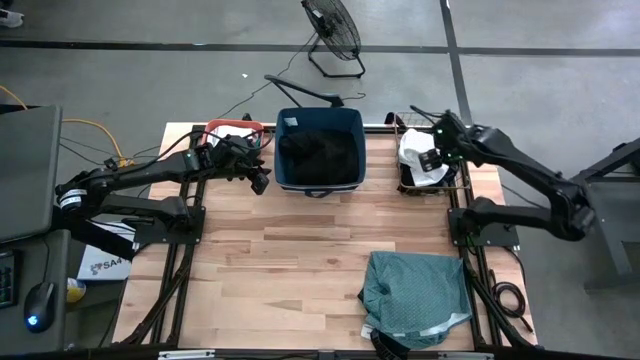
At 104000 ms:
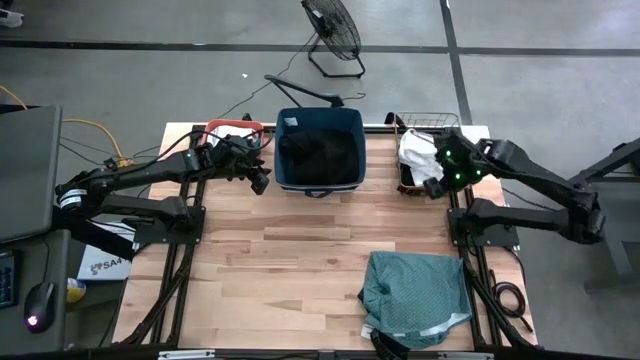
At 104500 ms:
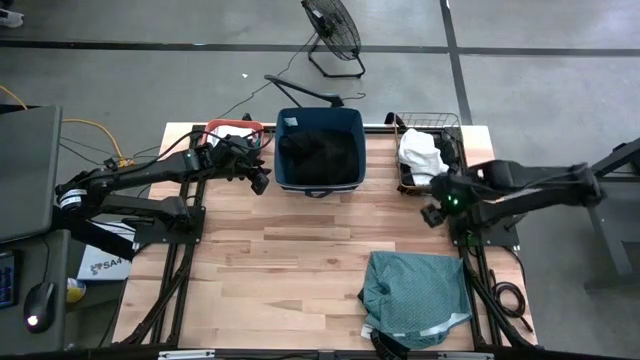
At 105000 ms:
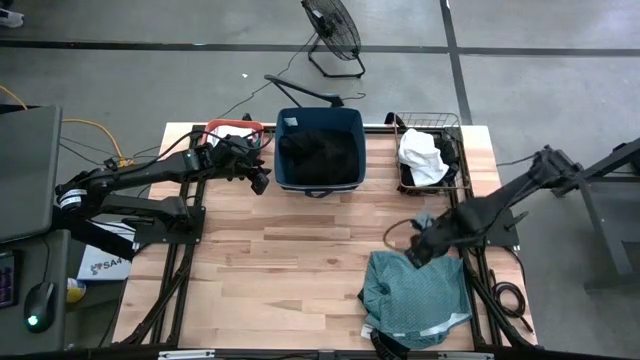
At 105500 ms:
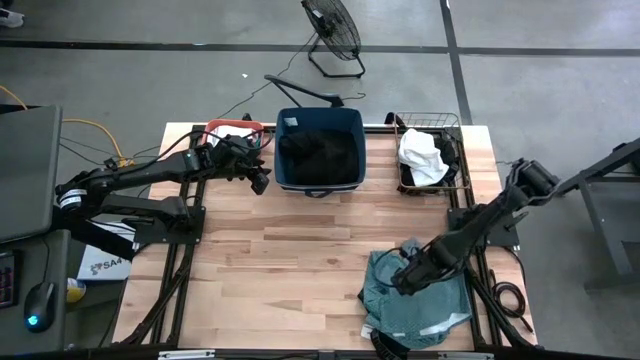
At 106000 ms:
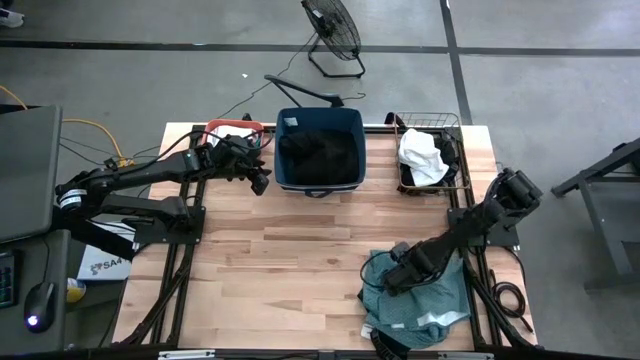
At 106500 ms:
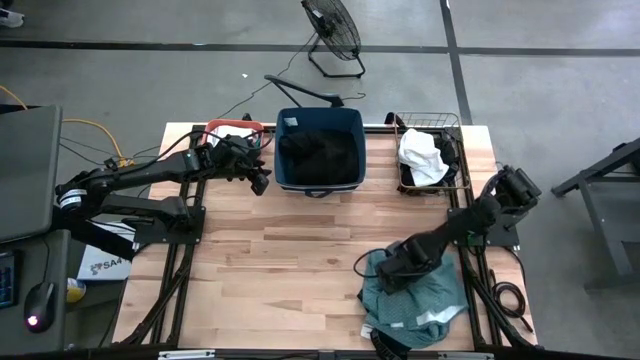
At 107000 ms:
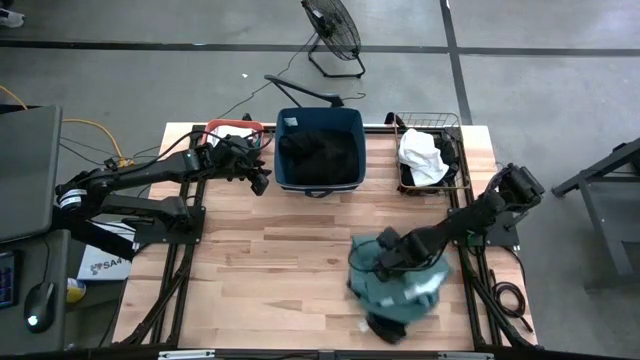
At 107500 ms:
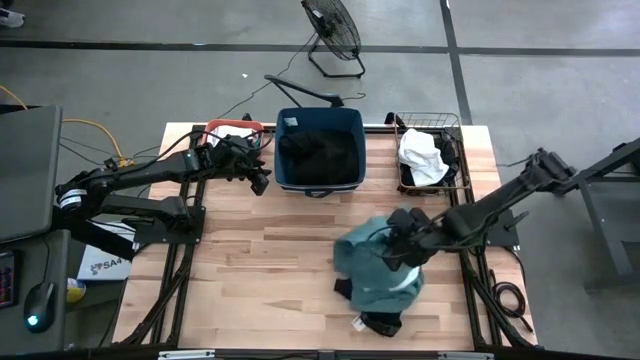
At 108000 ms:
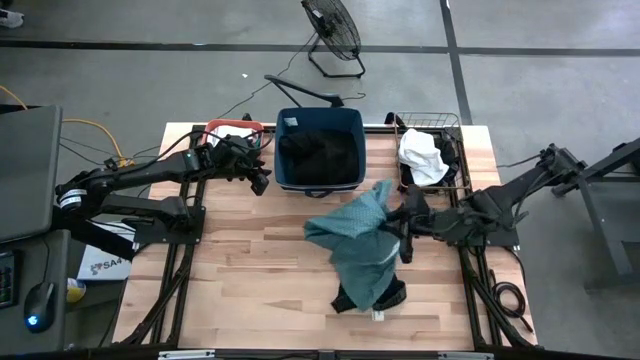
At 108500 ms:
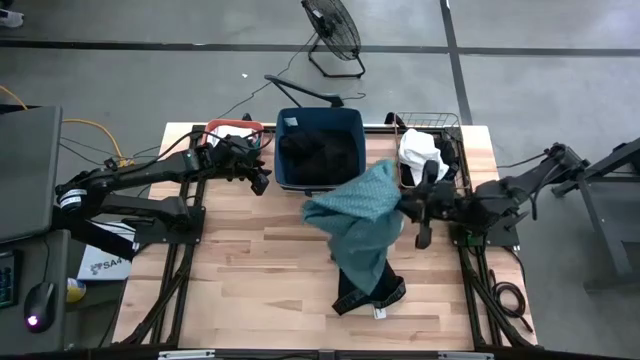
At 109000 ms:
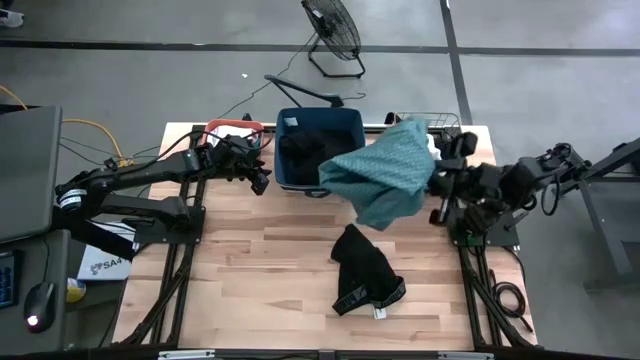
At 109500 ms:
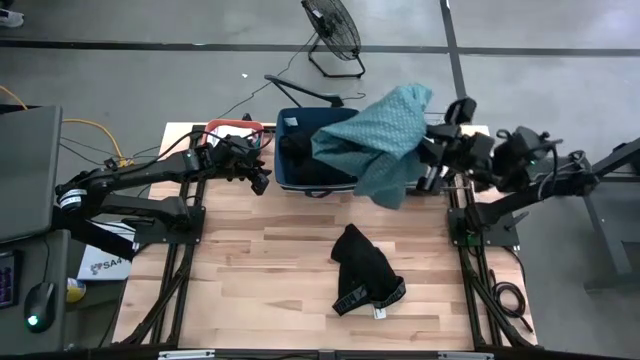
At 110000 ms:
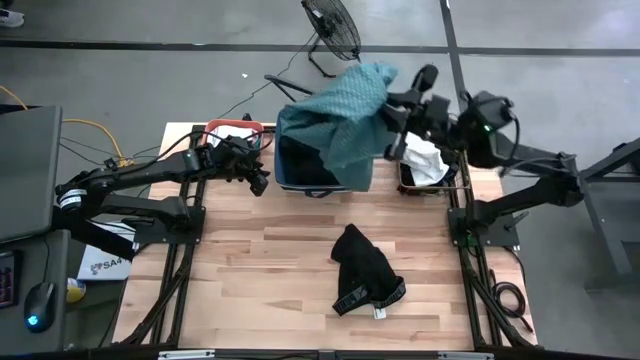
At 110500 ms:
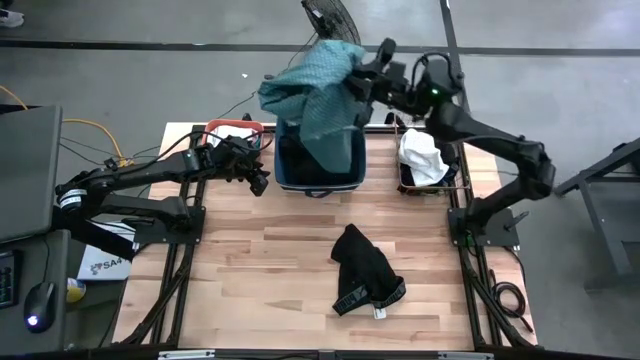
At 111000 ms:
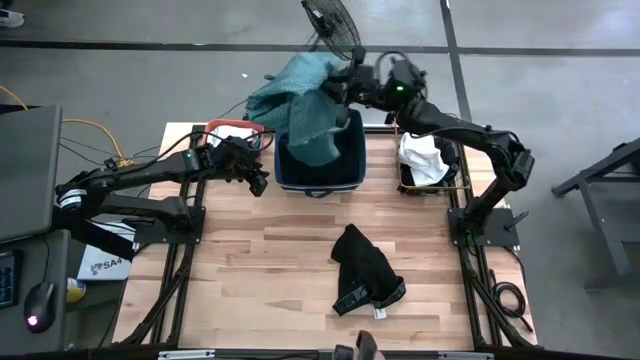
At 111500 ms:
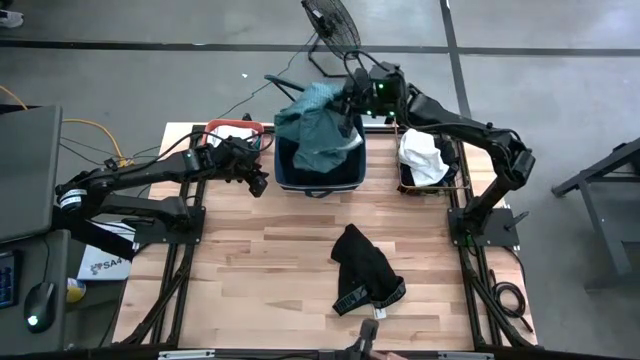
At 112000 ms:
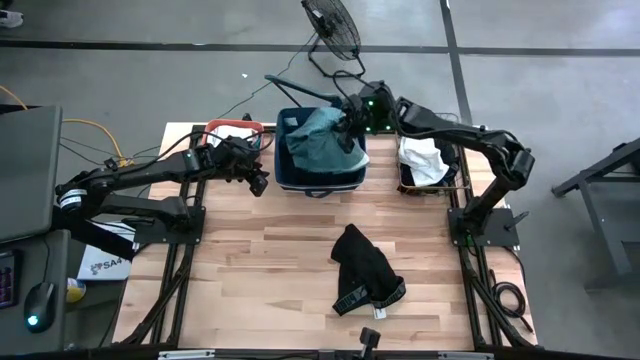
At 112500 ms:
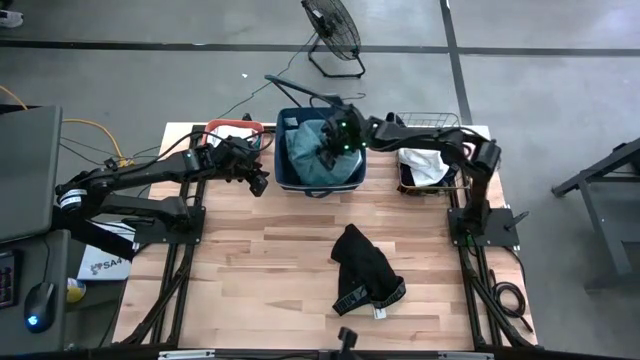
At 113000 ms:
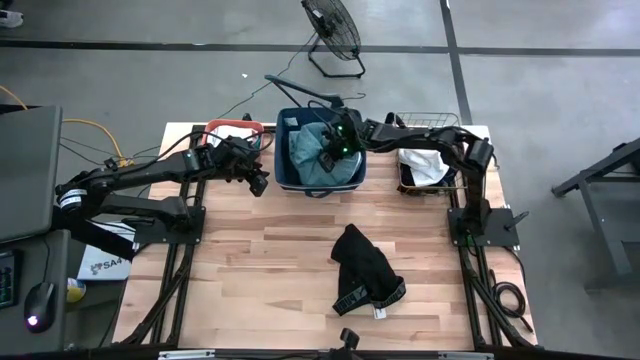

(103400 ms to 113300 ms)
Task: Pick & Place Cloths
Put the blue shirt into the blue bin

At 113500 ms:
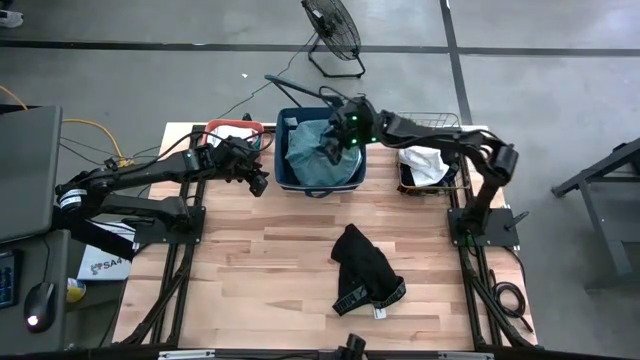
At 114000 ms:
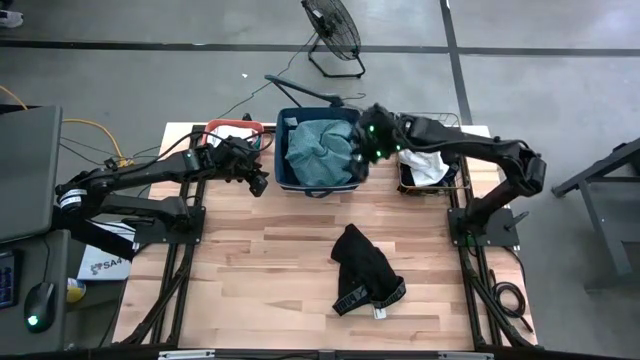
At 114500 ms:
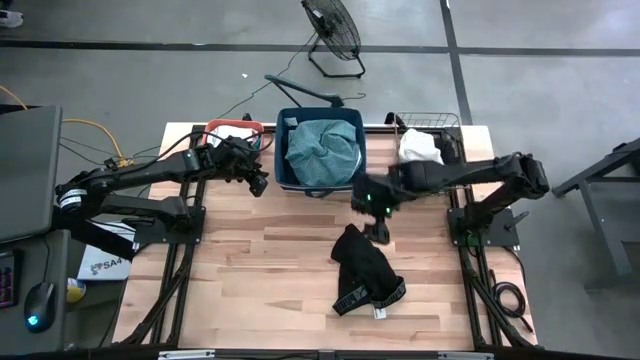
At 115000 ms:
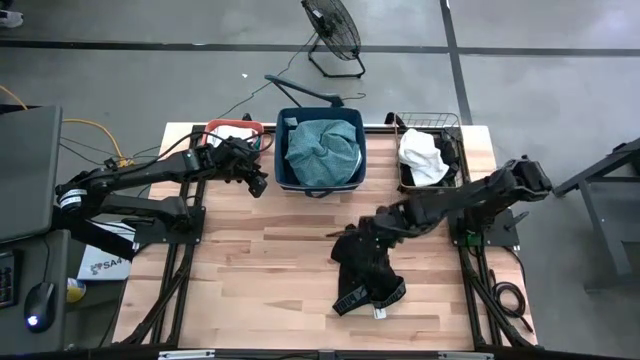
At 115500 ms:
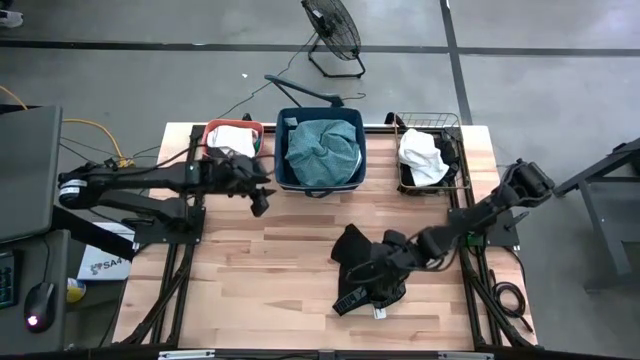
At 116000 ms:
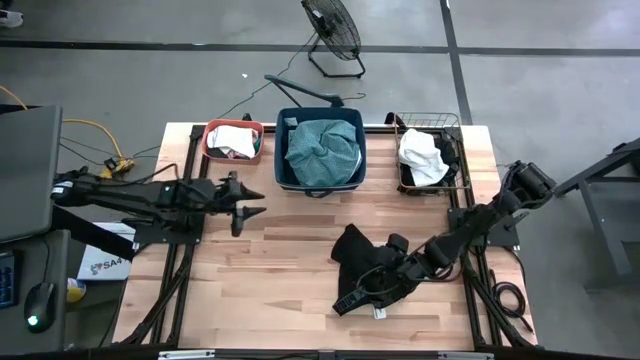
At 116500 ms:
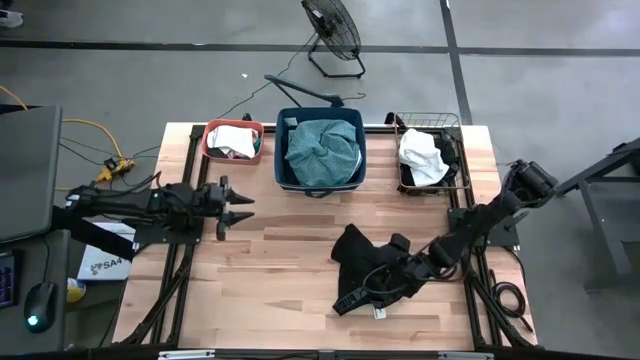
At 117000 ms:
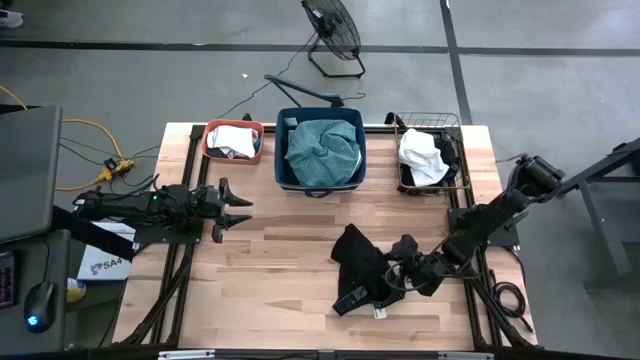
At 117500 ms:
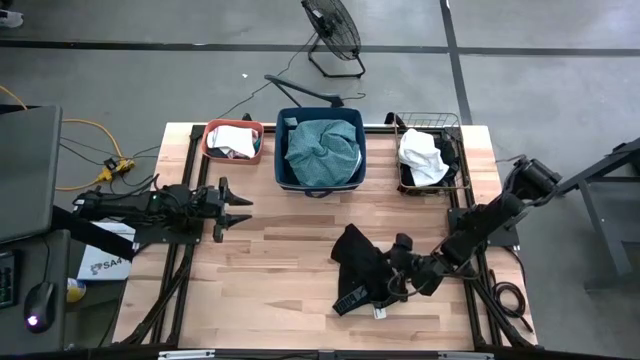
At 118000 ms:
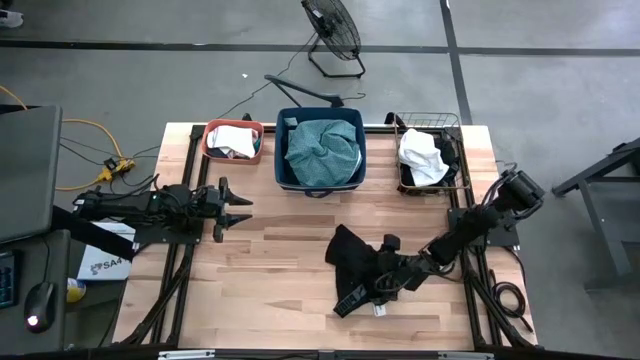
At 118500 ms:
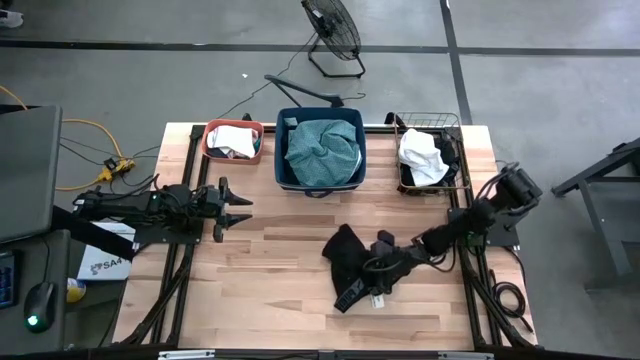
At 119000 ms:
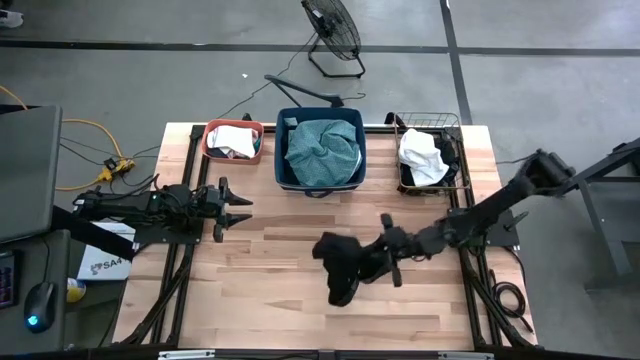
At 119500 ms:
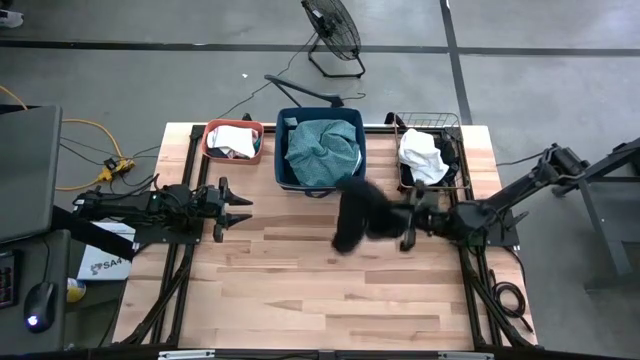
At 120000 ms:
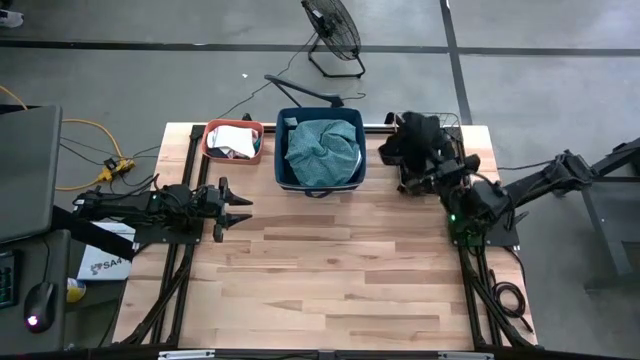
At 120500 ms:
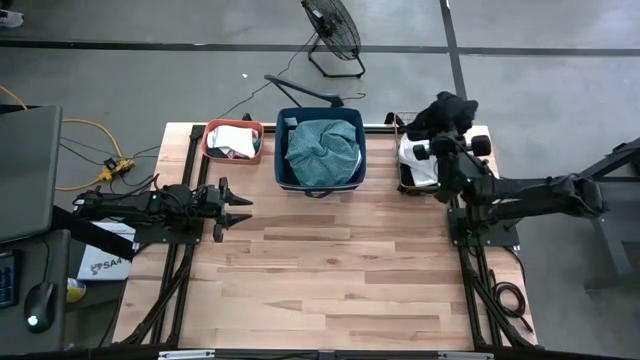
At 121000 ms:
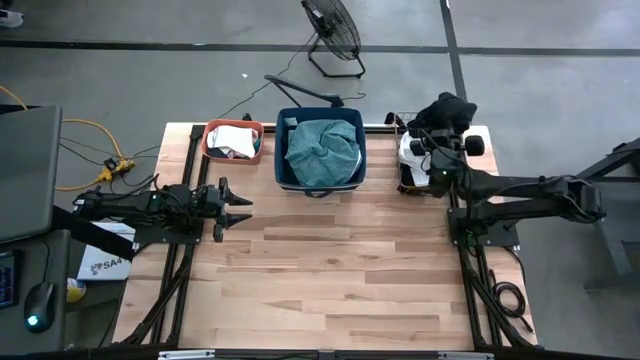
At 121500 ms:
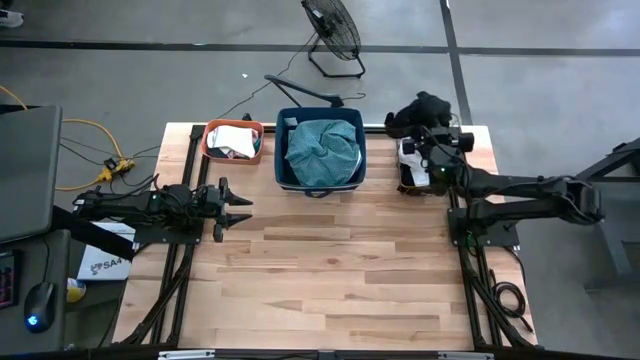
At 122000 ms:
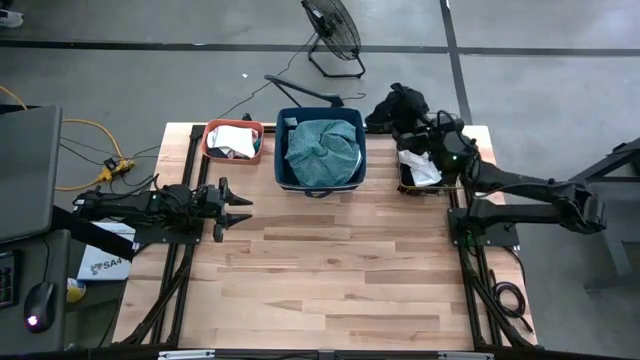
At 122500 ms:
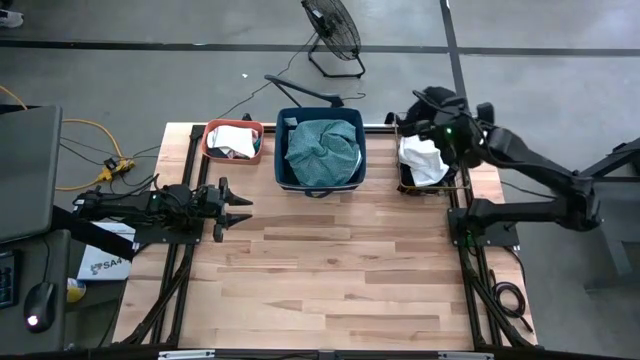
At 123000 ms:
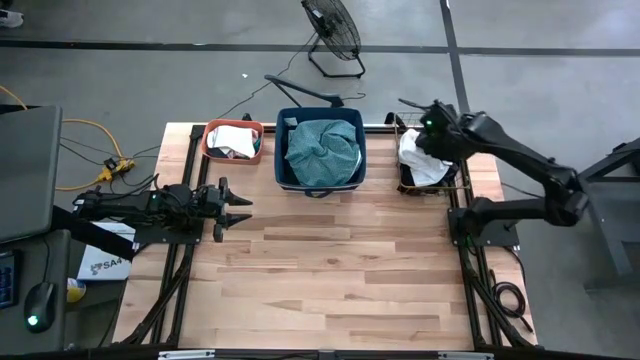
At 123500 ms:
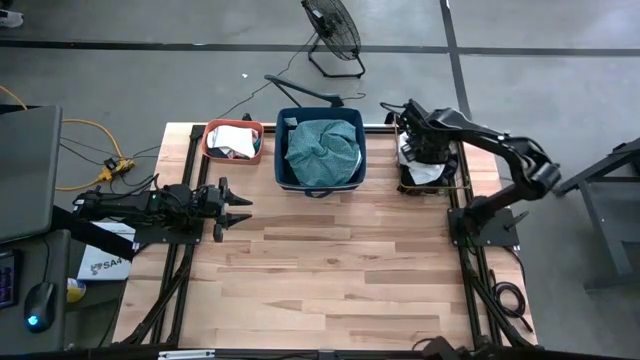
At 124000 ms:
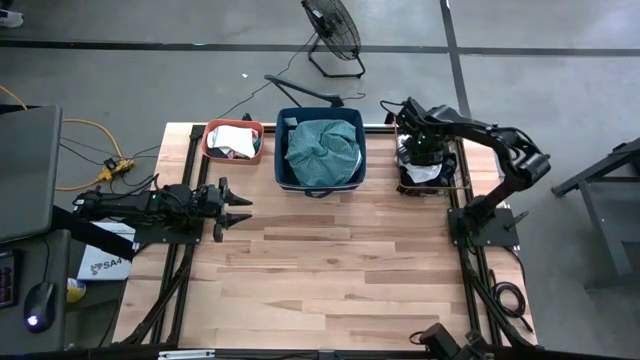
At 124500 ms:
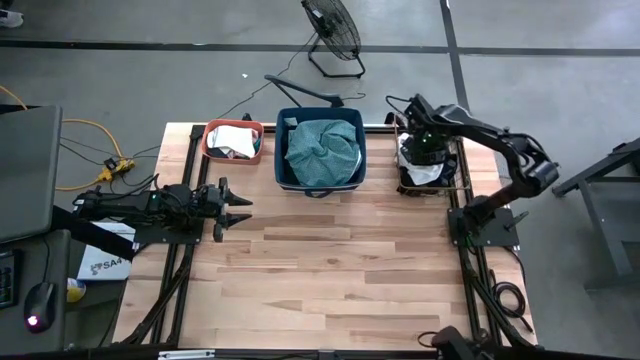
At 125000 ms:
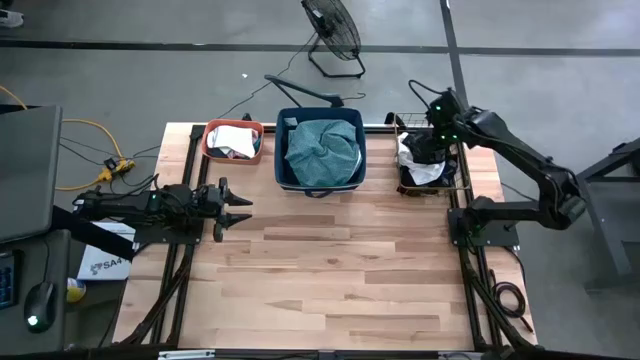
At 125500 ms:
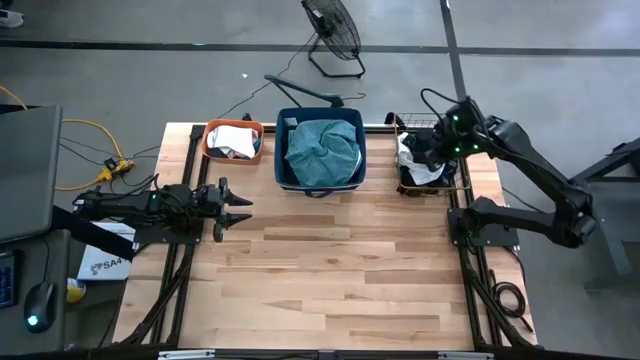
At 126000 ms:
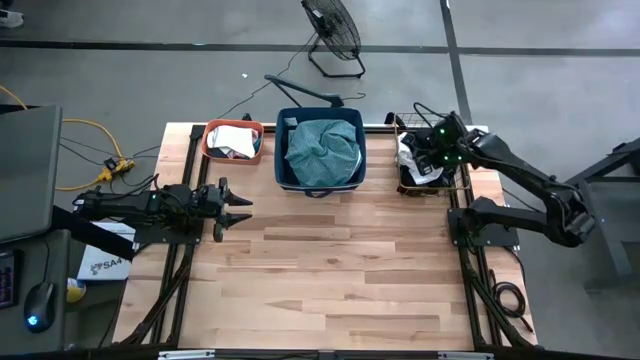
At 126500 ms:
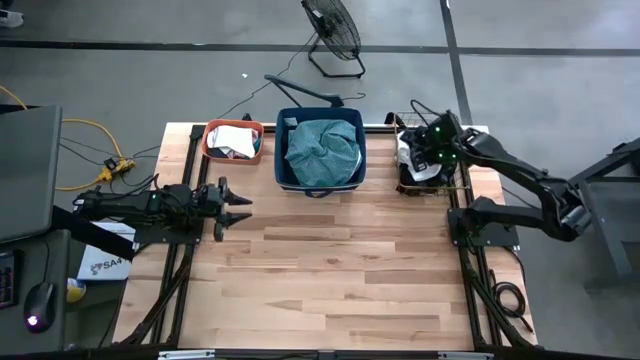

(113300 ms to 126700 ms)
Put the black boxer into the wire basket
